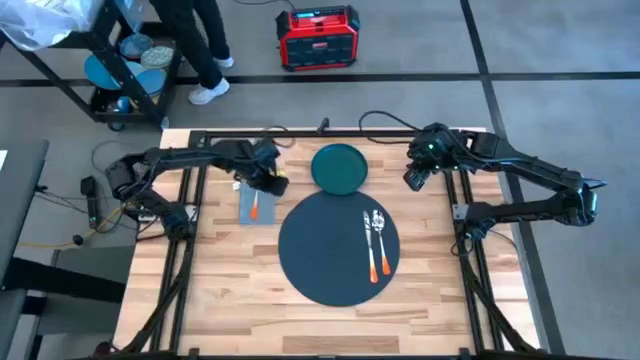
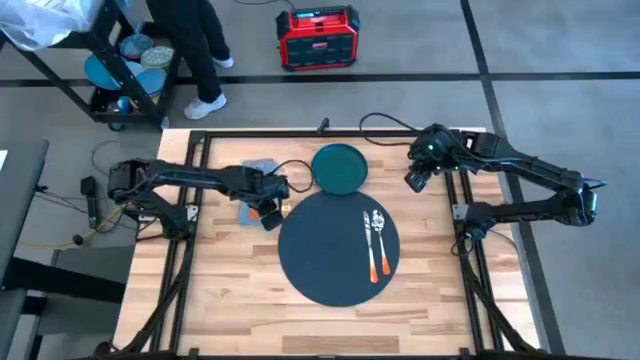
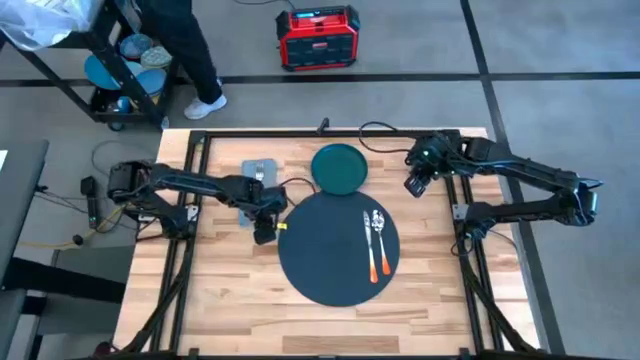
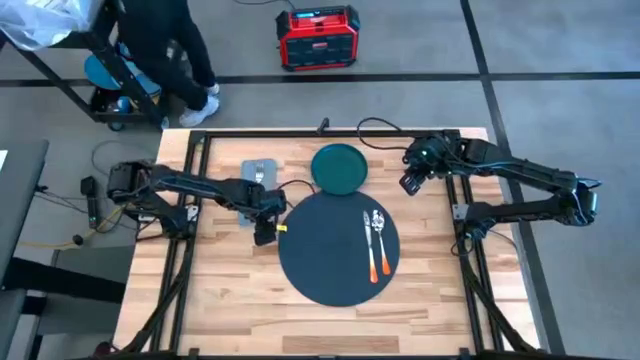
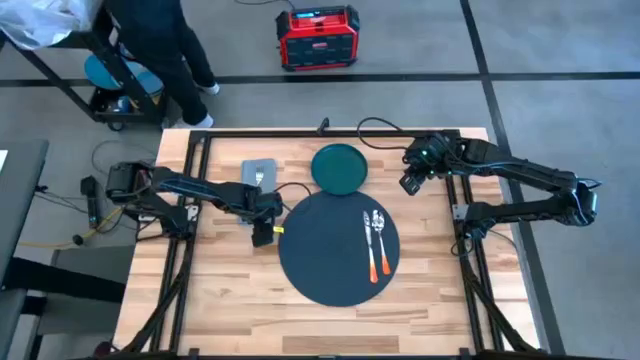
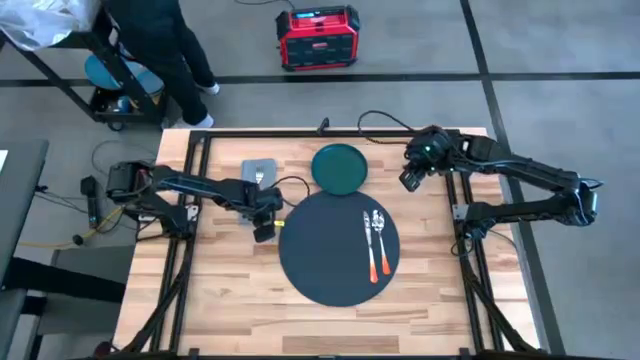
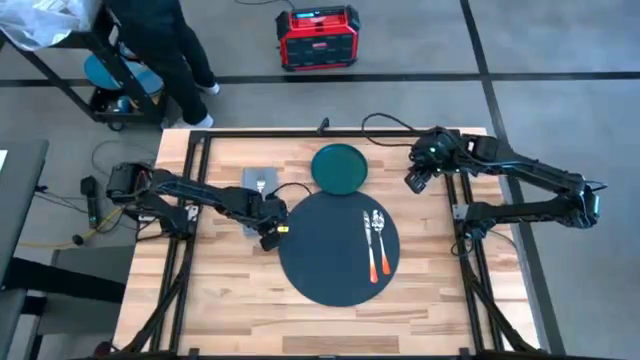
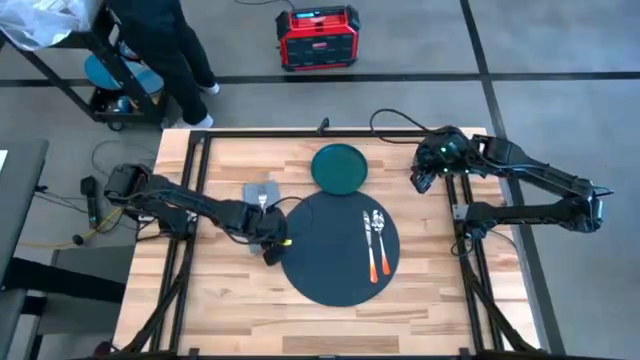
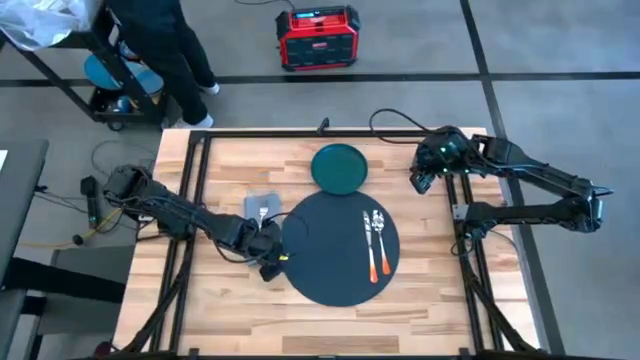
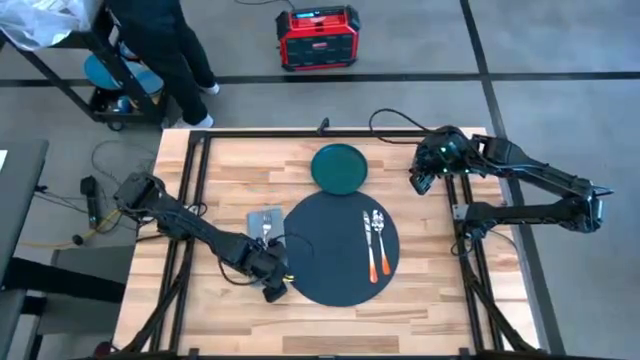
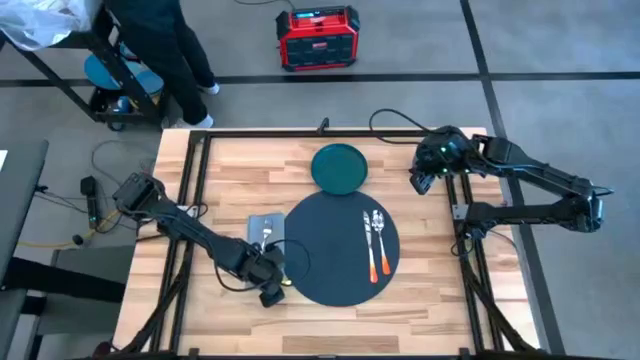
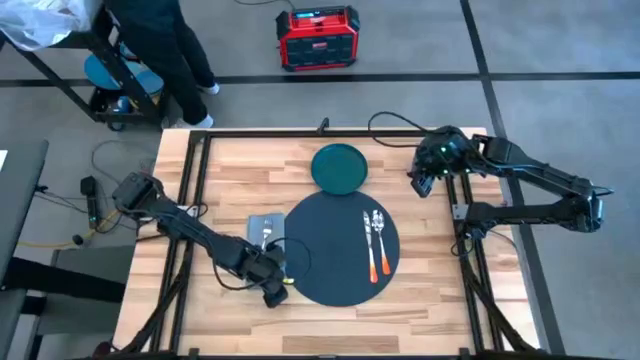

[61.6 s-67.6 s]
Task: Set table place
Move the gray table napkin to the left of the blue placemat

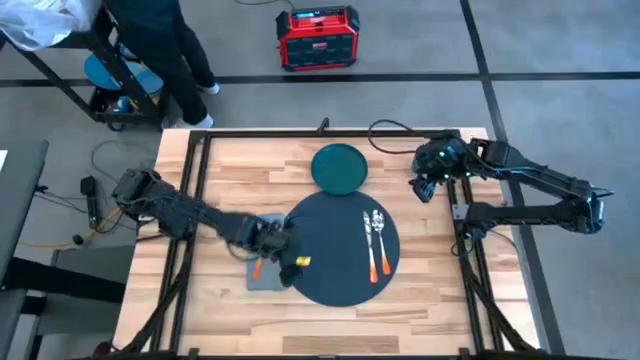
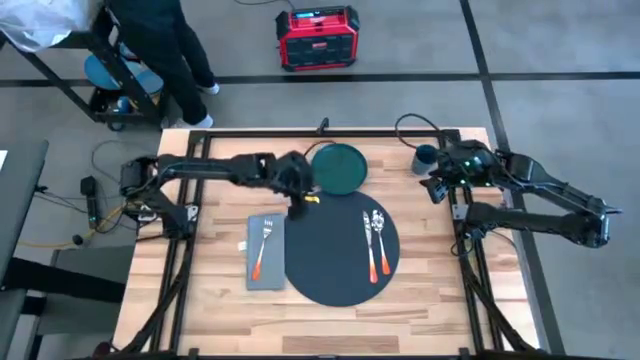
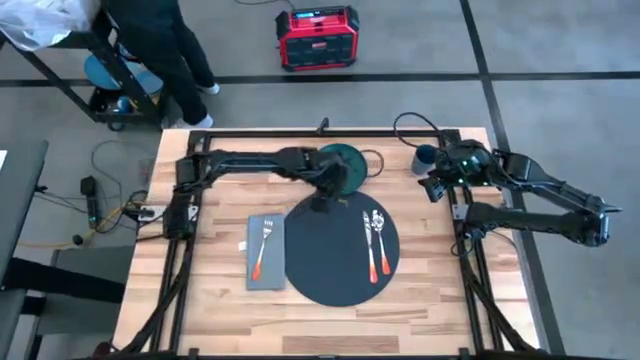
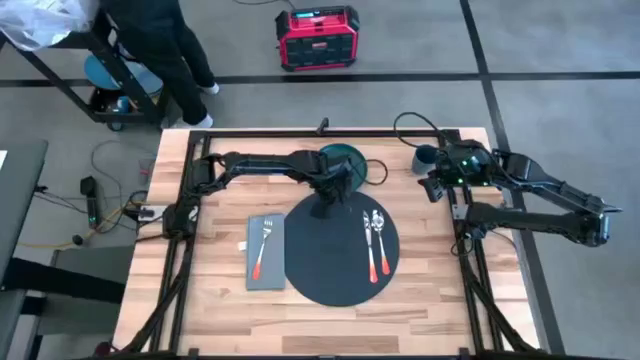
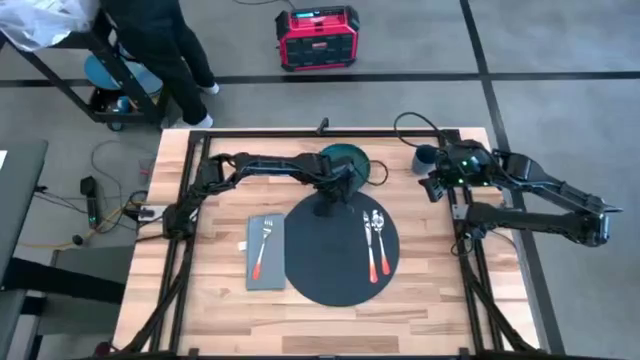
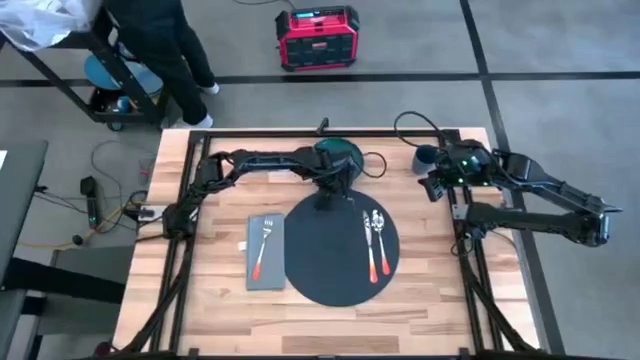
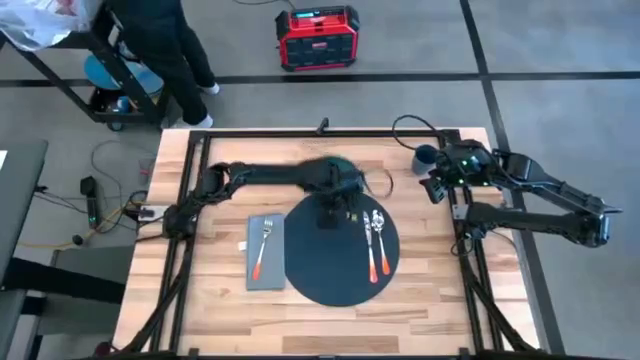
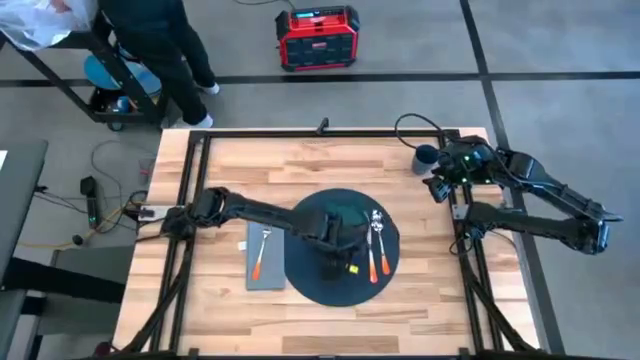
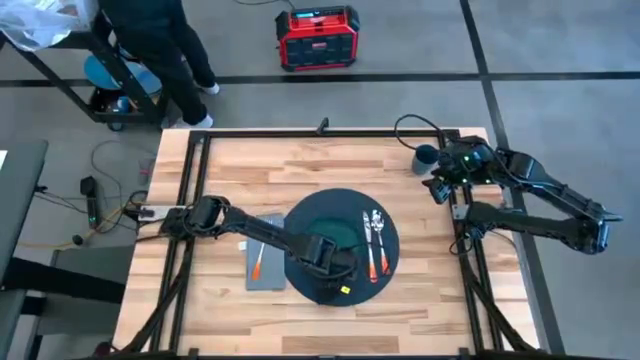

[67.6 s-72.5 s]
Put the green plate on the blue placemat to the left of the orange table knife

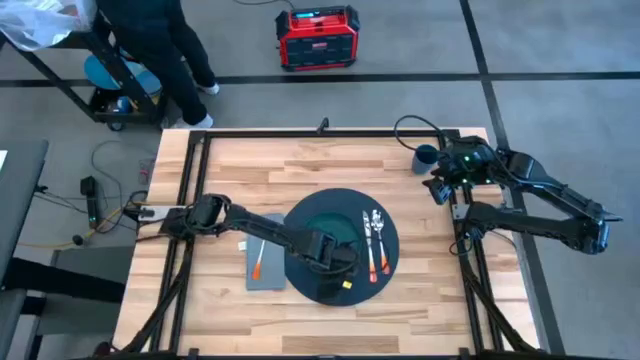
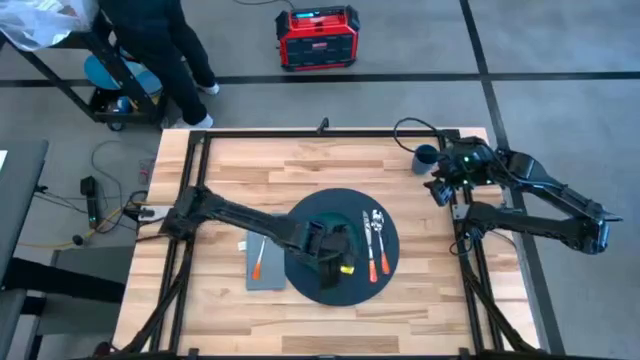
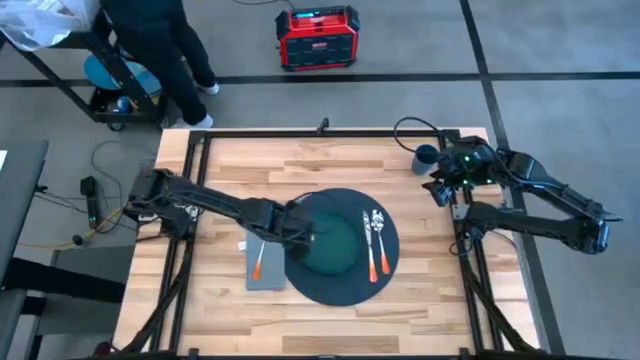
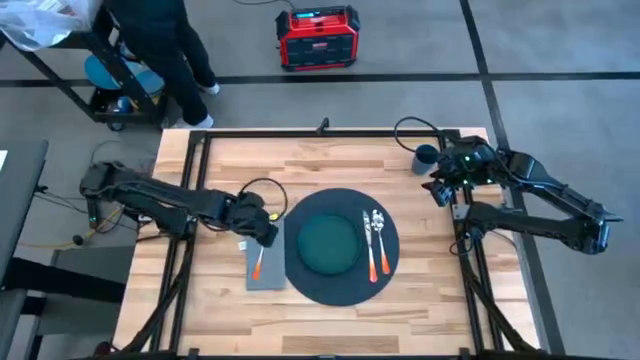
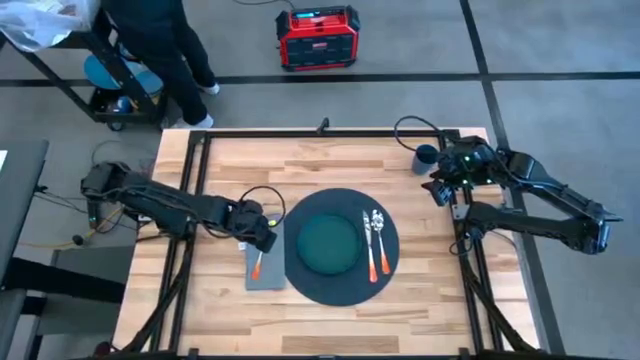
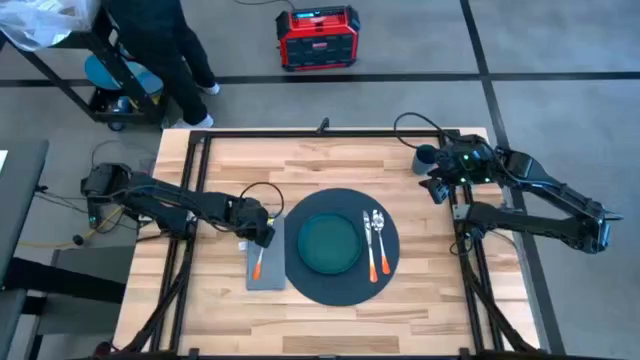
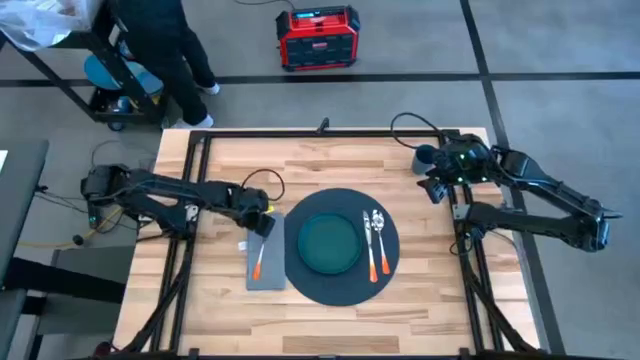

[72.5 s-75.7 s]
Adjust the gray table napkin on the table

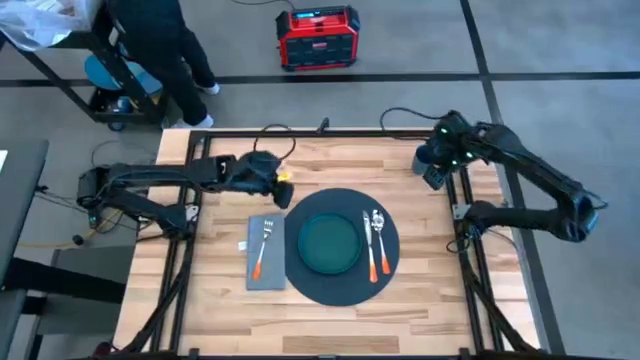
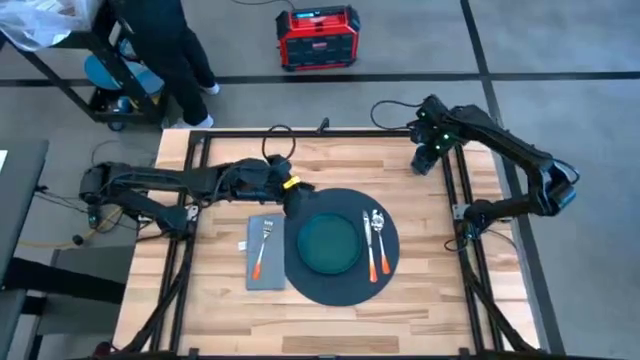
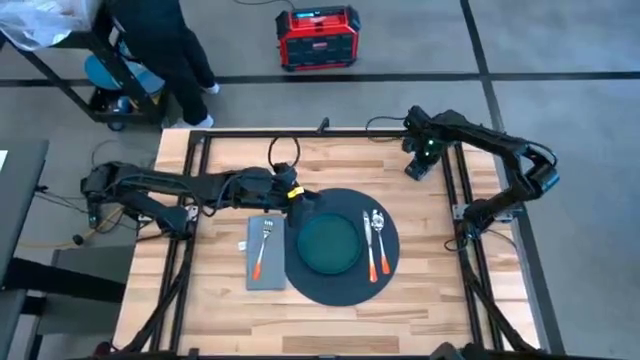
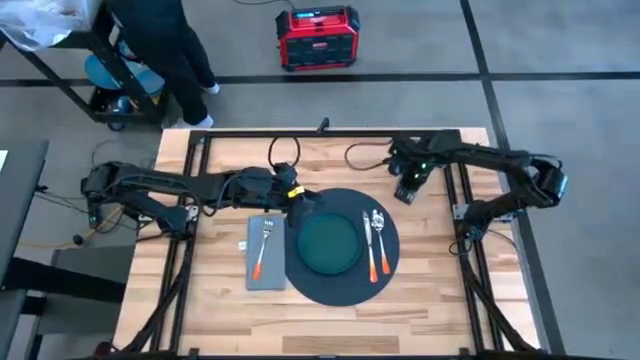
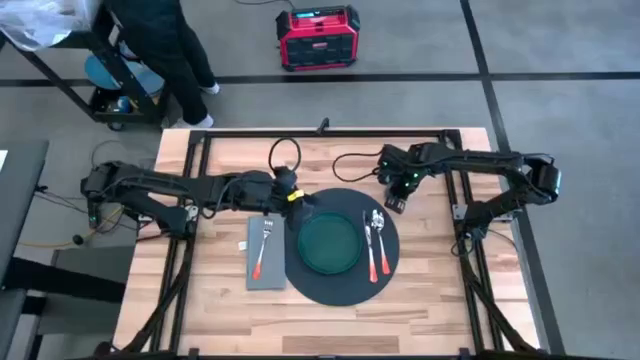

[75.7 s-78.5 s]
Move the blue cup on the top right of the blue placemat

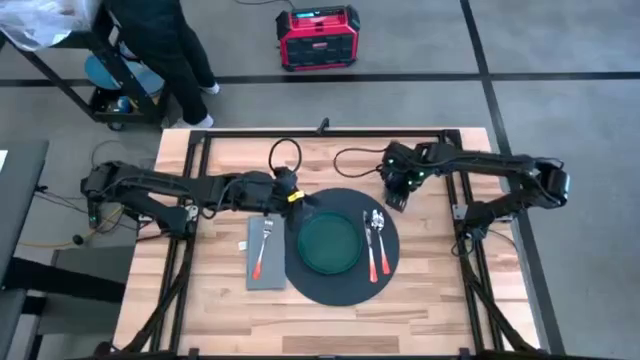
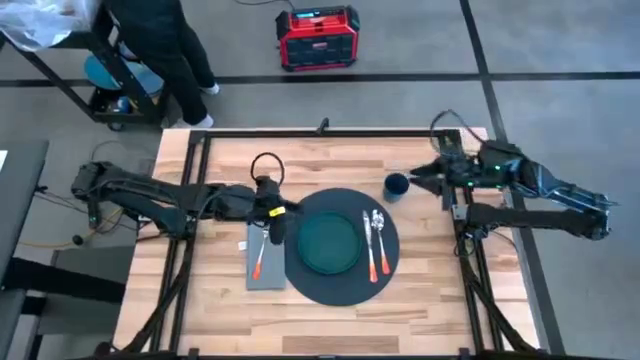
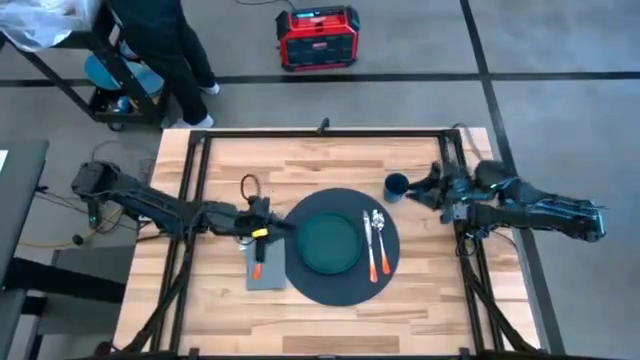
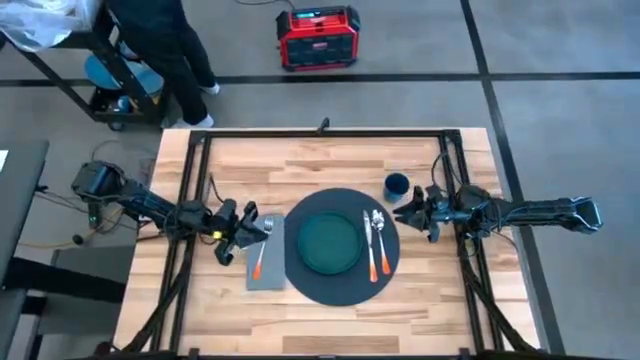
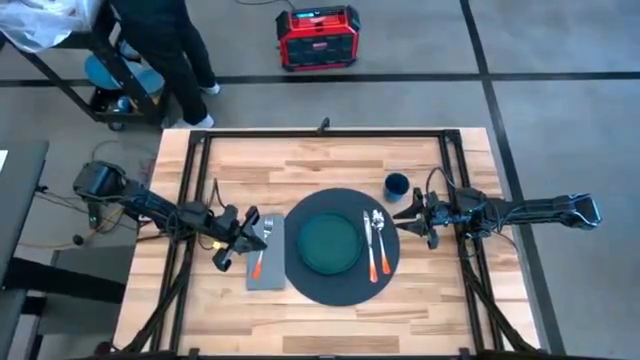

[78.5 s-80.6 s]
Return to Home Position

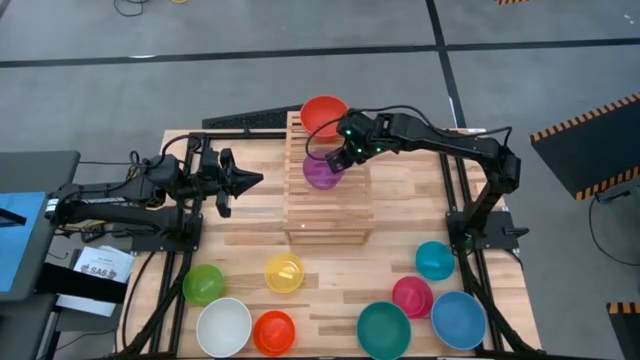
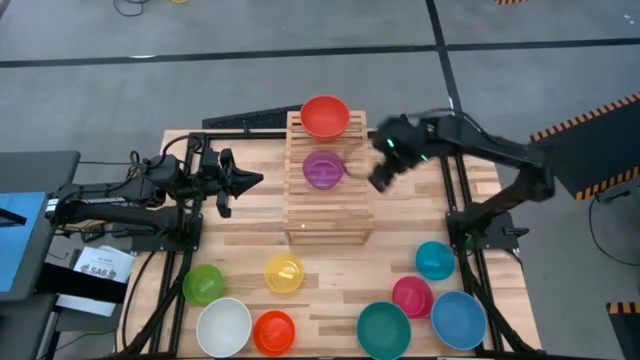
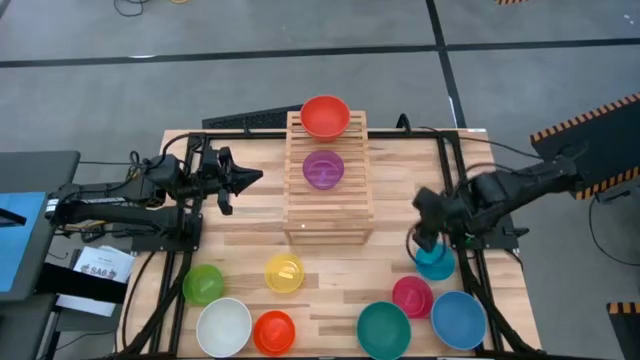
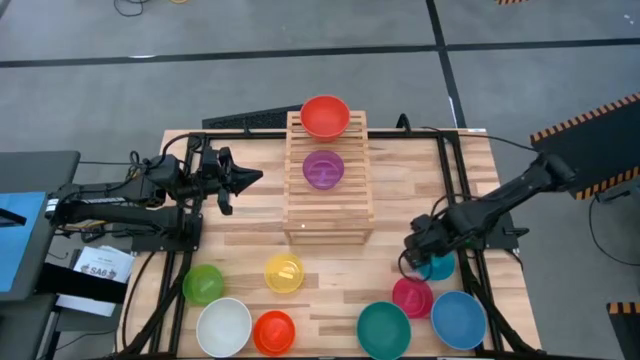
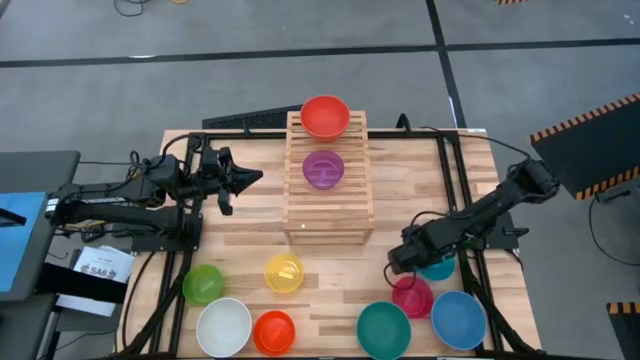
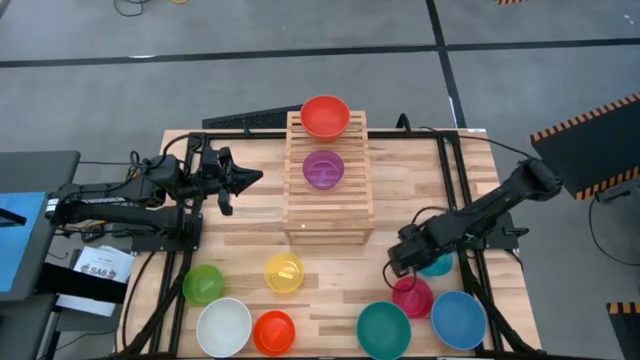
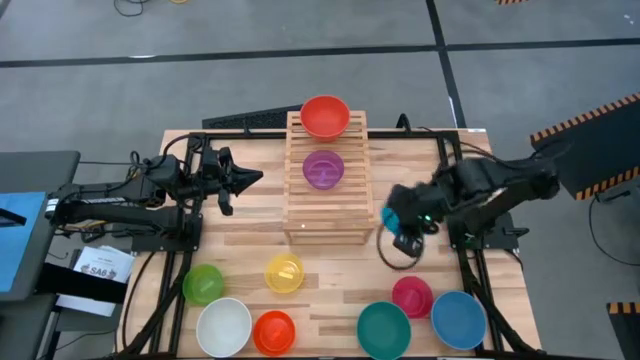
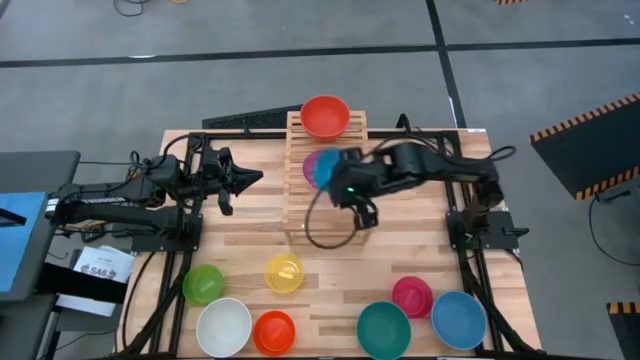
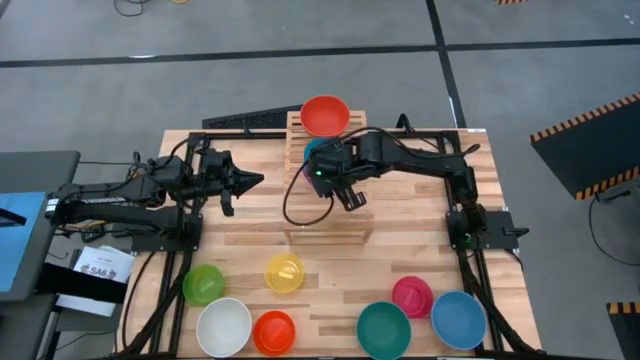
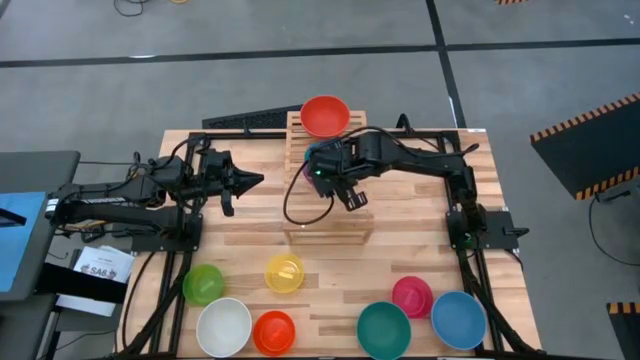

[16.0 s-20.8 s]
Task: Place and stack bowls onto a shelf
Stack the small blue bowl on top of the small purple bowl on the shelf
